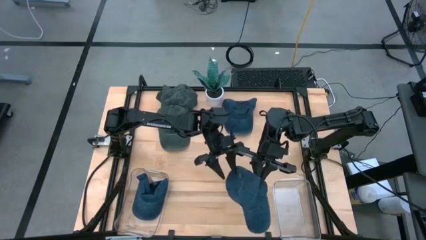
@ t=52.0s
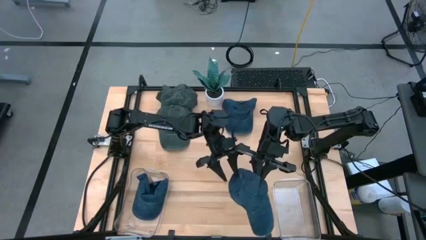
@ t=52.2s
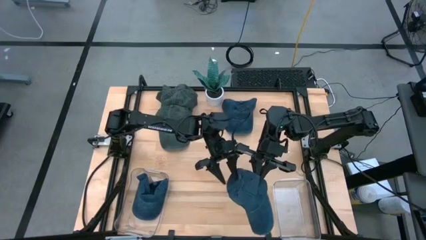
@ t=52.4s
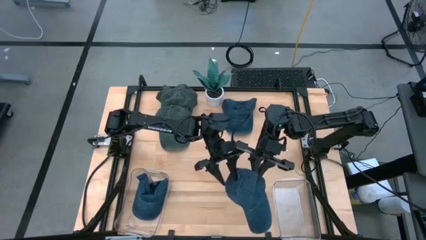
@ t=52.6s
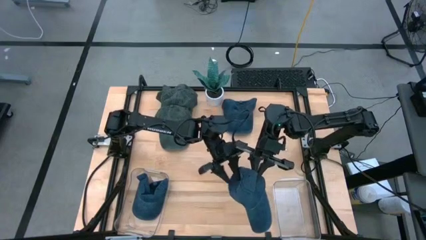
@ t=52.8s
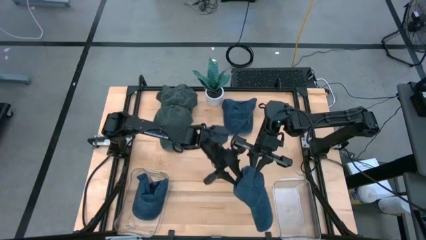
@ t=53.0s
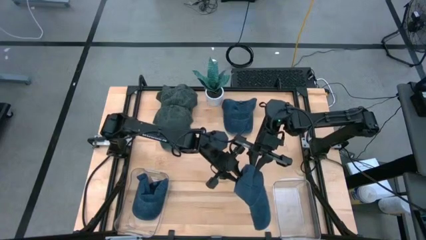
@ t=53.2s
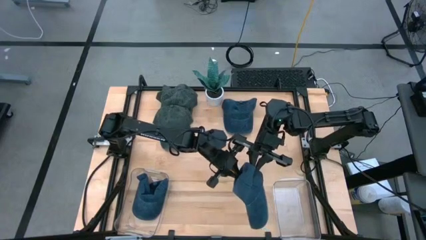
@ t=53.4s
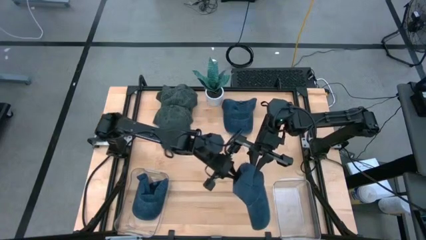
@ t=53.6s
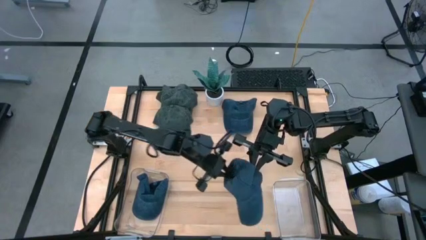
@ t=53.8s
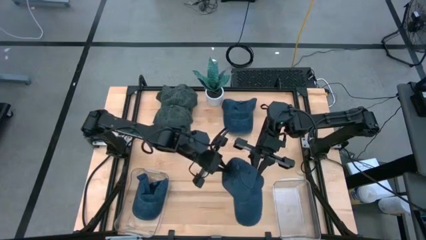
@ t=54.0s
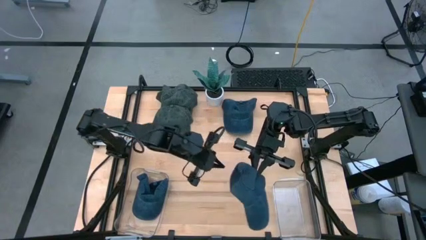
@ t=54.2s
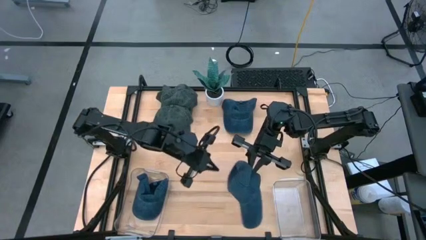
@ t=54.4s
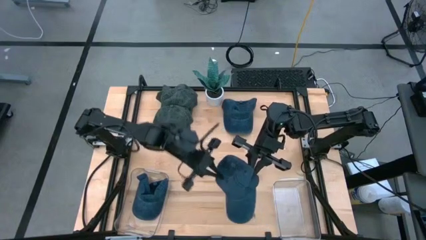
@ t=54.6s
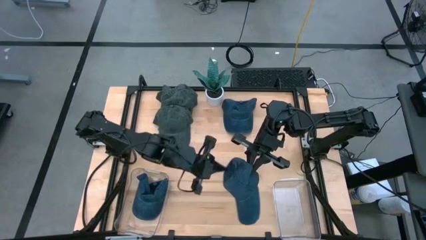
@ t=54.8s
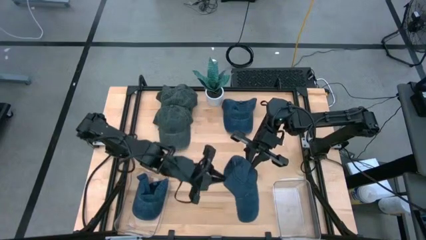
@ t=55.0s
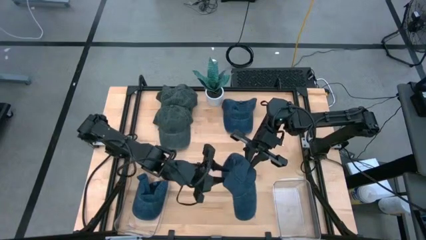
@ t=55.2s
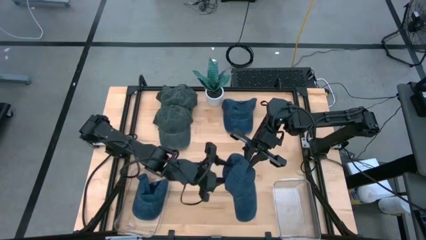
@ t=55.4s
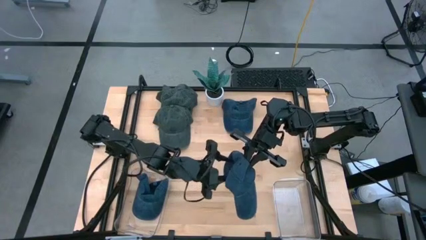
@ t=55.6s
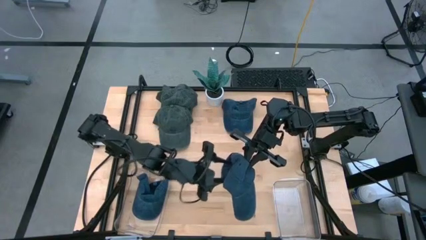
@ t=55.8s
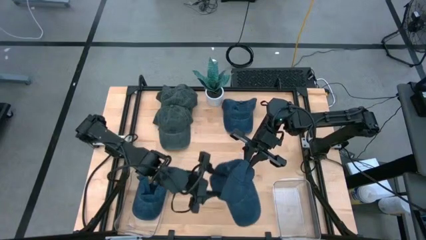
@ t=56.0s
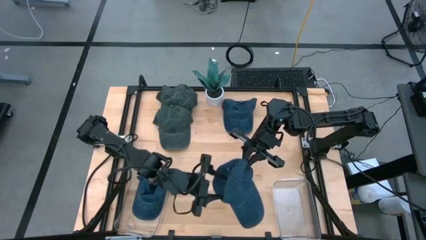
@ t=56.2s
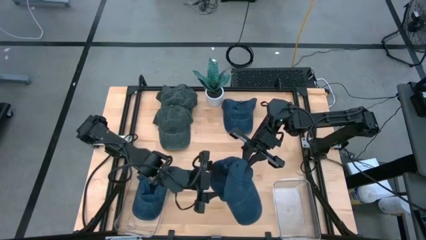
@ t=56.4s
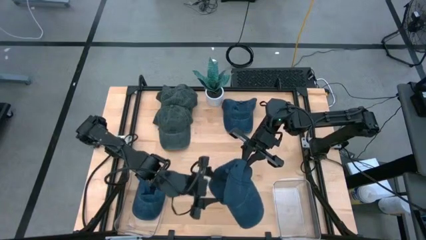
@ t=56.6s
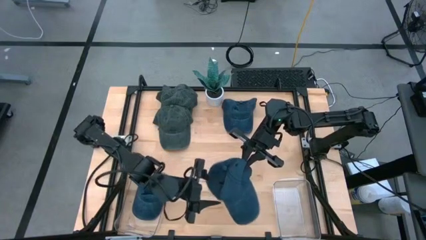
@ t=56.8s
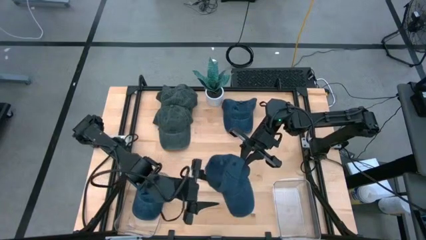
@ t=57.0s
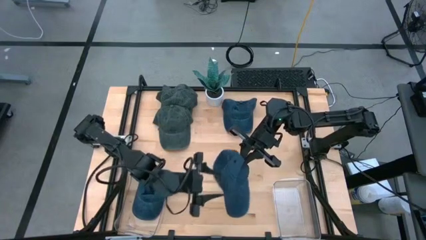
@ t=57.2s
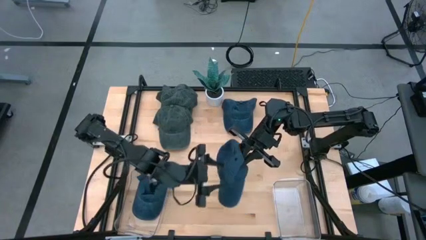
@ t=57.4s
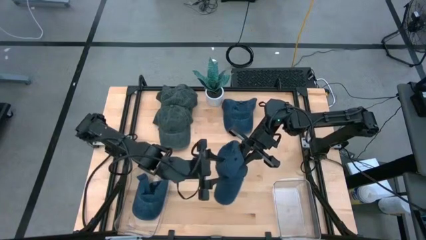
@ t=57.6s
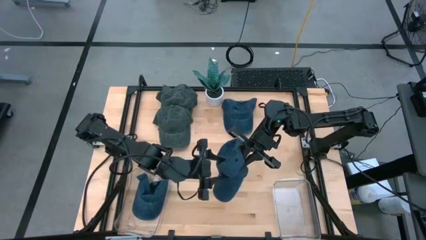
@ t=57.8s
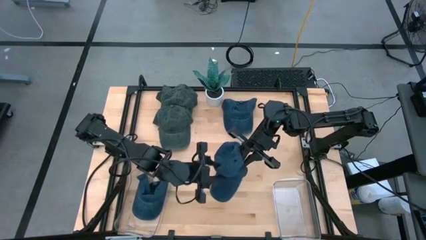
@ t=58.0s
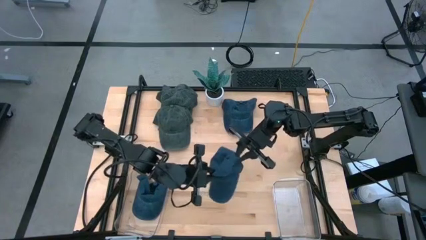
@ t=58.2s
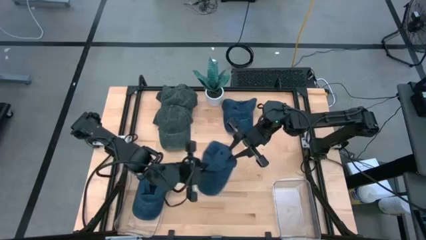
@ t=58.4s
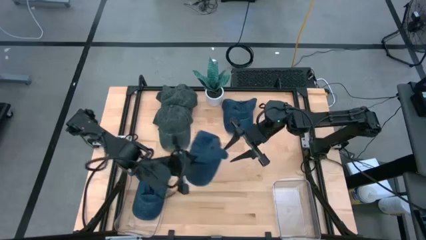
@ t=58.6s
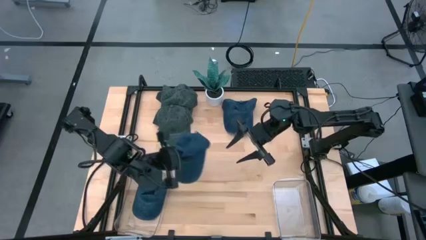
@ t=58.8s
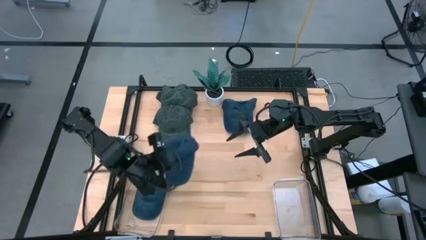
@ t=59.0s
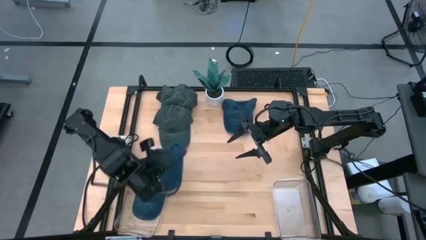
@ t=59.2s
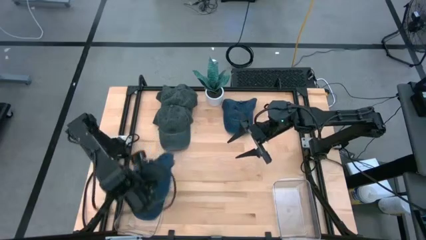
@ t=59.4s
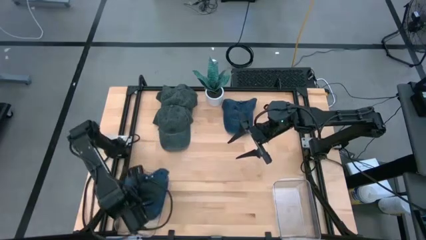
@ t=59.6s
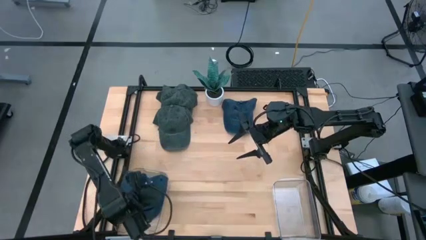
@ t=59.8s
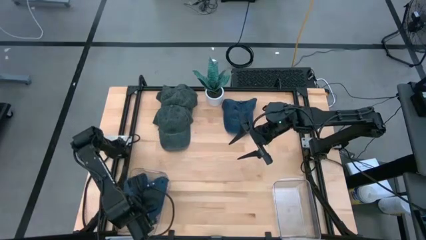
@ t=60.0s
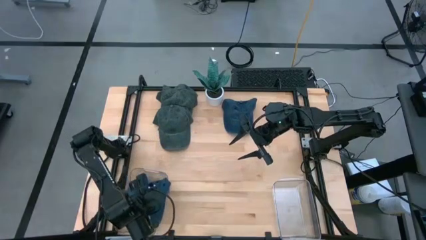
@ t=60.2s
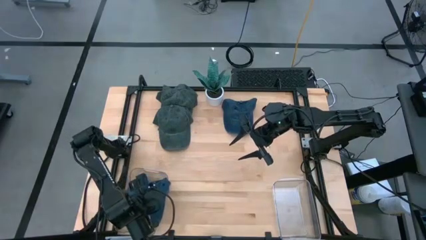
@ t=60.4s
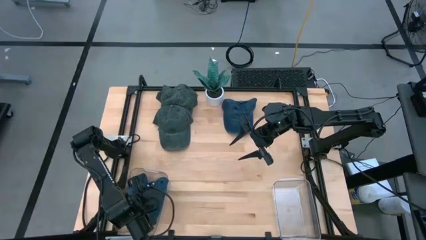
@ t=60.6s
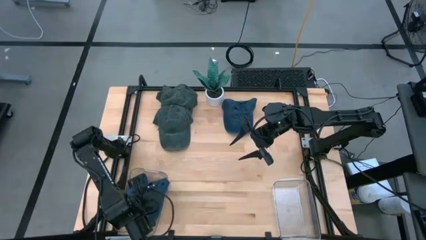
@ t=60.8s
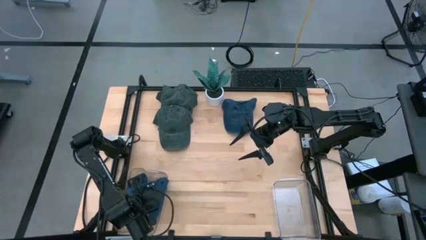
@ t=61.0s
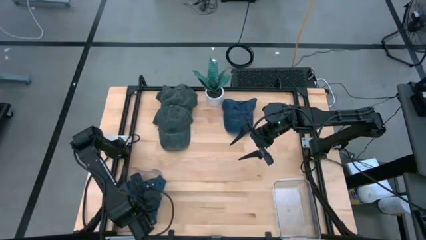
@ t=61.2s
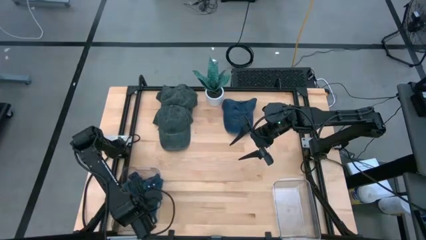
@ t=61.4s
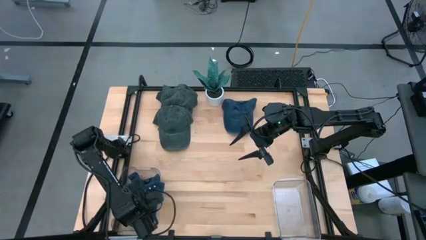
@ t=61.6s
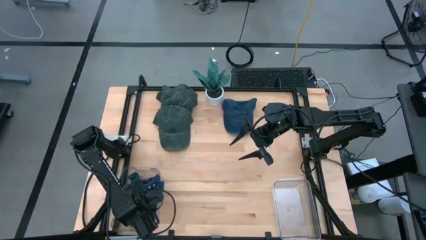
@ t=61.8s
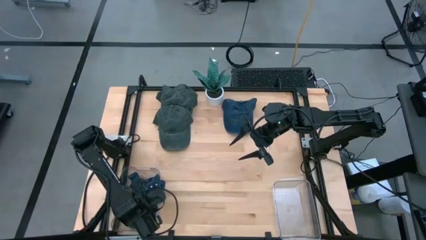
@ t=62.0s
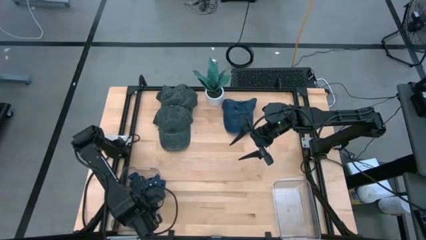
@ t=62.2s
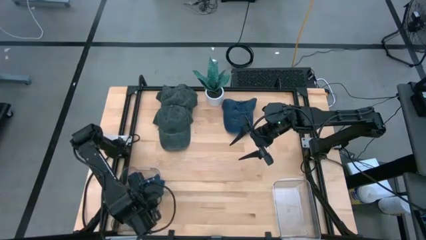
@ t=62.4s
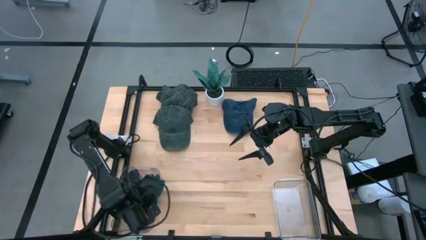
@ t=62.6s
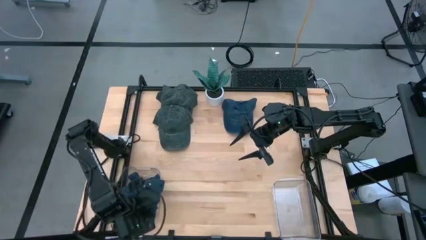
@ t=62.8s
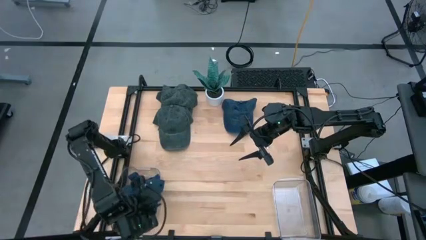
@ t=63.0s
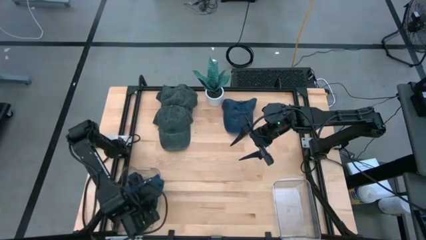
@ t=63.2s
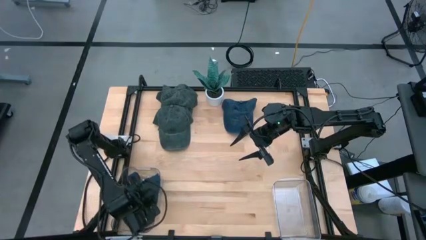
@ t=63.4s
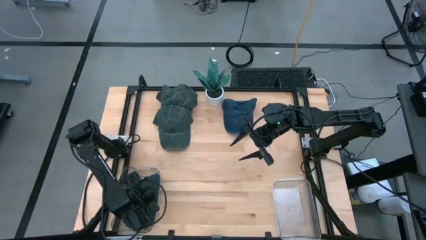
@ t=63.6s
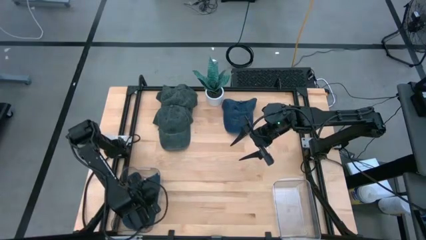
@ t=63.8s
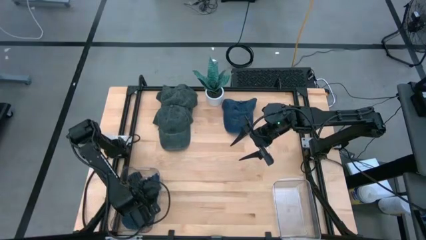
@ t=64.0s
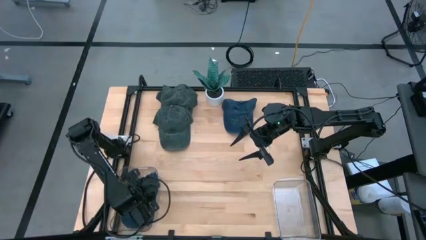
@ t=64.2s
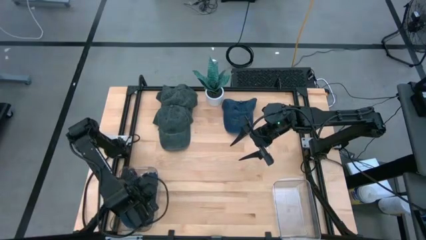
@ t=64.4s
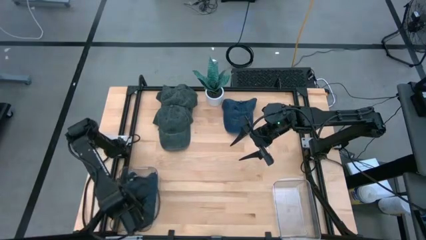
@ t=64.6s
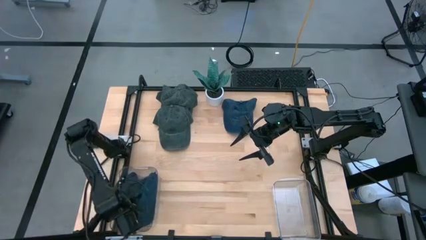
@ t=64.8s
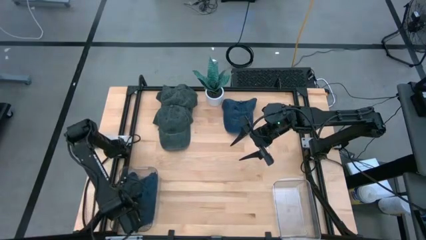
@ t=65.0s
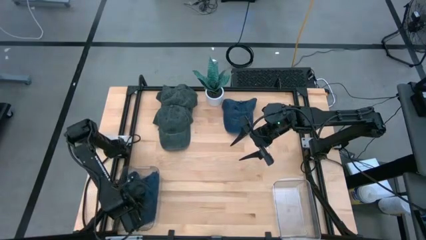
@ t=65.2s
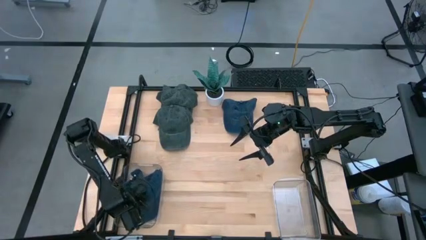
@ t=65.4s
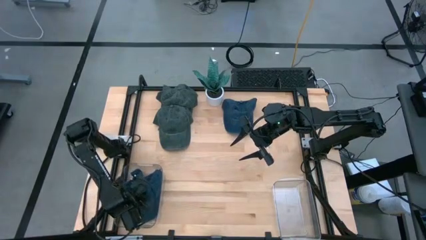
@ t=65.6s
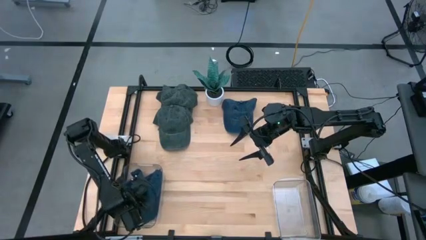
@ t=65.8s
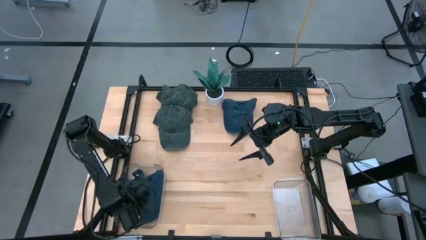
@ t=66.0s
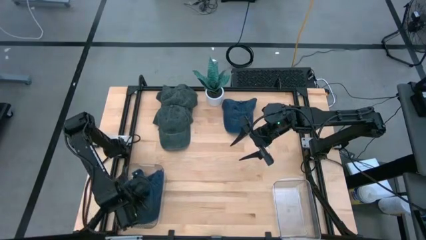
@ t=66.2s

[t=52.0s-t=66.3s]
Task: Pick & Place hat
Put the bottom blue cap into the left transparent bin

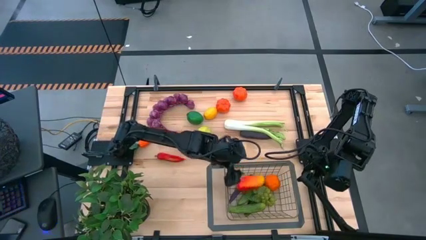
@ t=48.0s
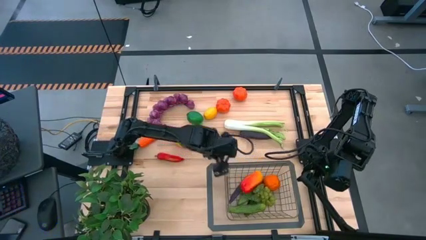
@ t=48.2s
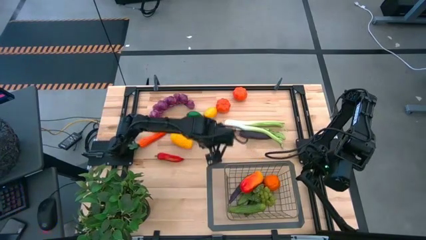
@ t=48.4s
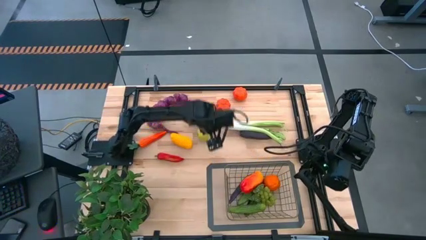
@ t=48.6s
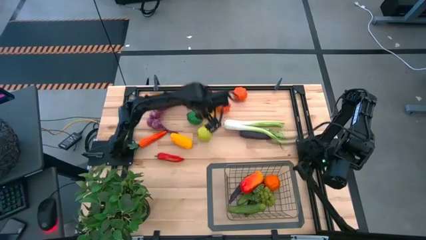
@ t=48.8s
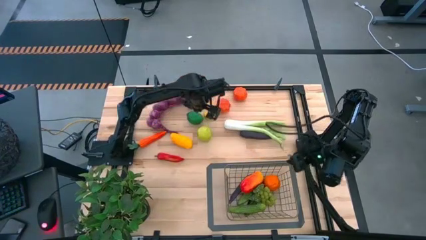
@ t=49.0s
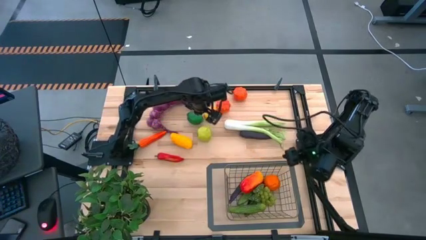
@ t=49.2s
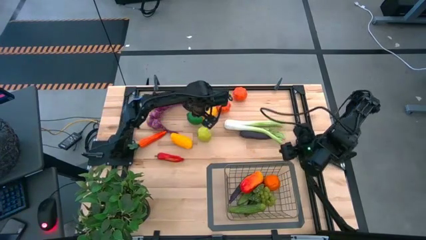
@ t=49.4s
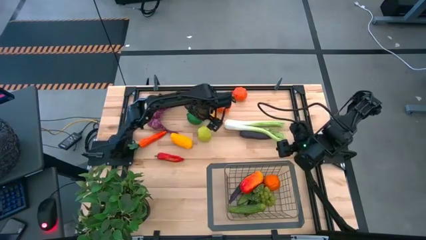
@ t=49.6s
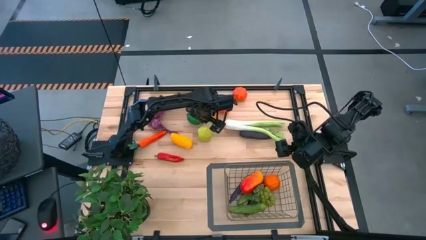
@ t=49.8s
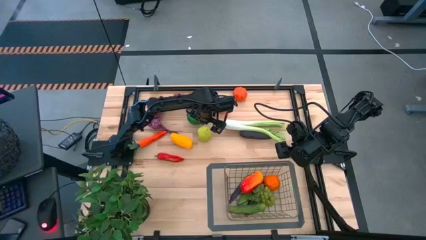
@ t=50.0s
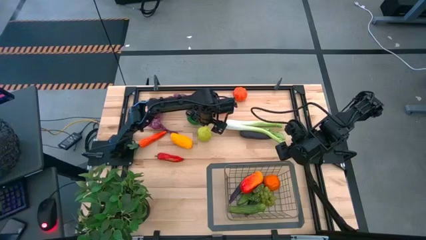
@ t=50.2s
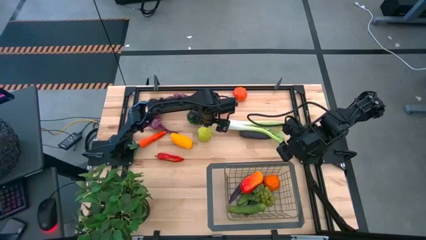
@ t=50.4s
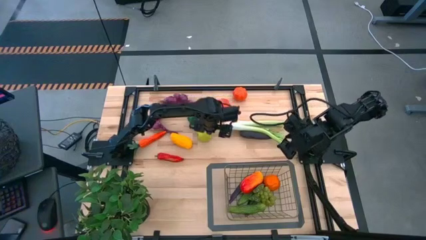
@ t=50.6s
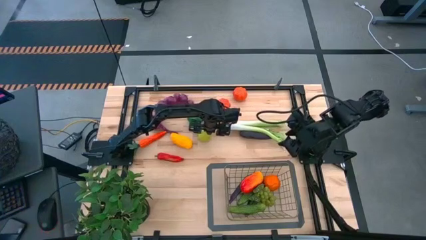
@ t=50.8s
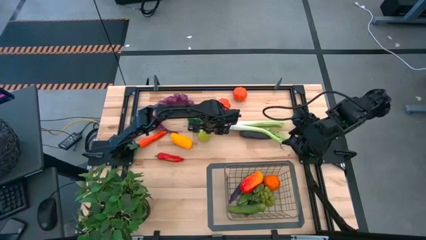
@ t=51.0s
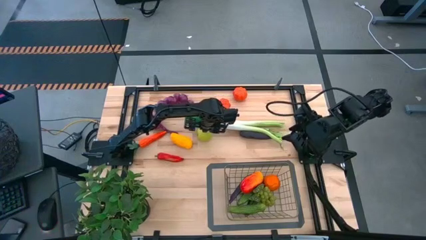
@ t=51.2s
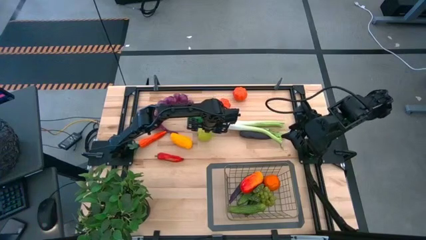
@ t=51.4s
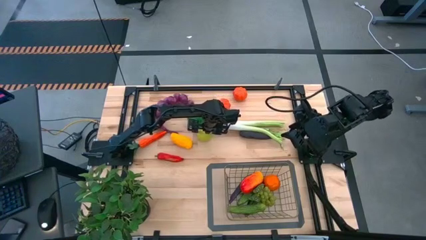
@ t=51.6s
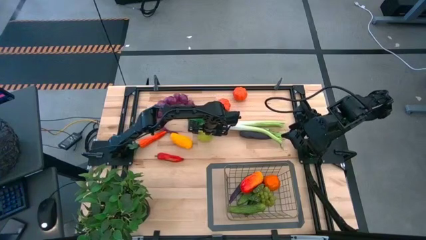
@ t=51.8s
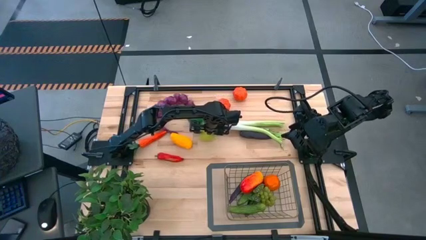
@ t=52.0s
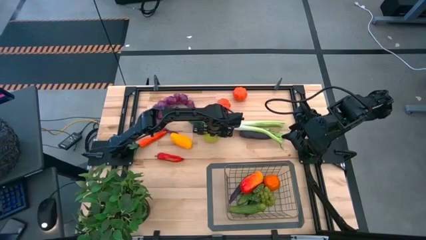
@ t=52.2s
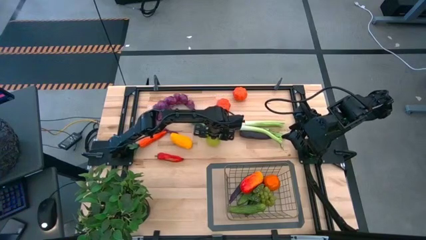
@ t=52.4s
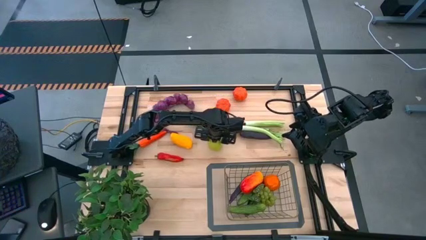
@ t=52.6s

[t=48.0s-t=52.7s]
Task: Build produce basket
Put the apple into the wire basket
